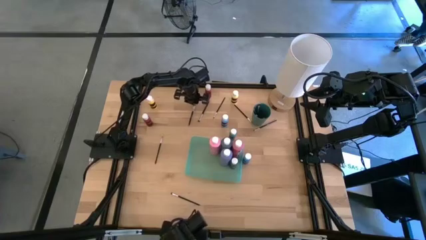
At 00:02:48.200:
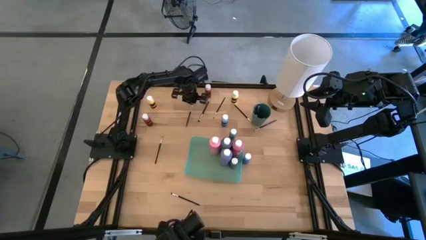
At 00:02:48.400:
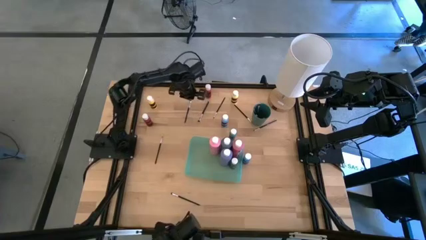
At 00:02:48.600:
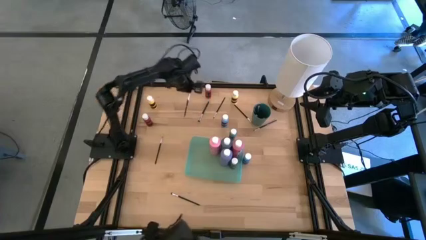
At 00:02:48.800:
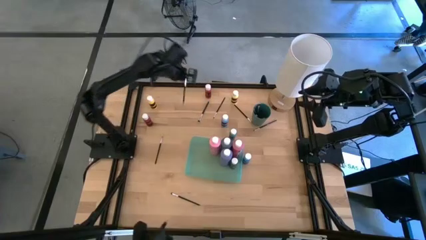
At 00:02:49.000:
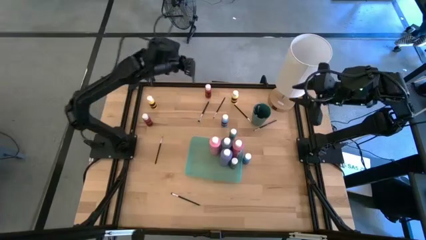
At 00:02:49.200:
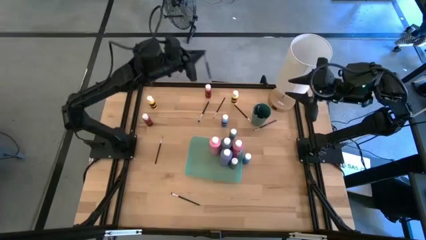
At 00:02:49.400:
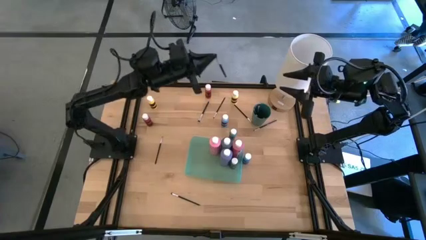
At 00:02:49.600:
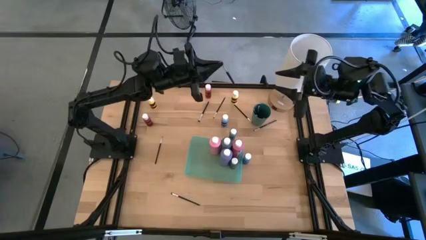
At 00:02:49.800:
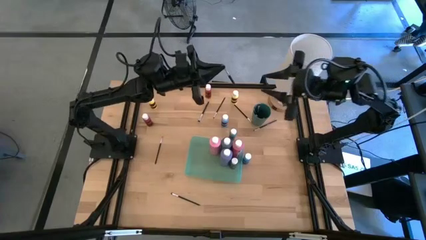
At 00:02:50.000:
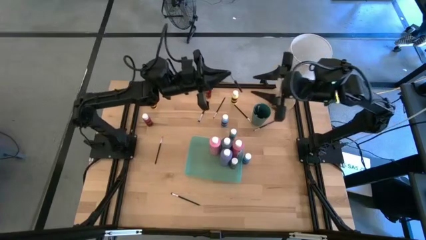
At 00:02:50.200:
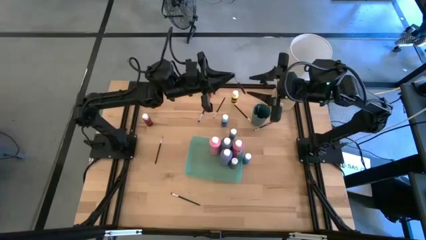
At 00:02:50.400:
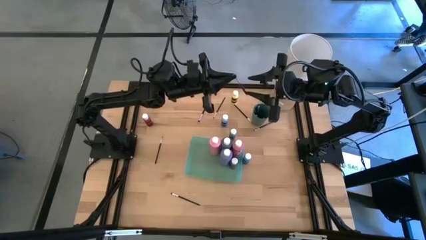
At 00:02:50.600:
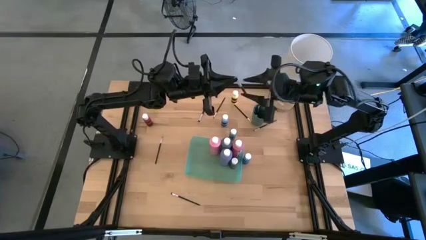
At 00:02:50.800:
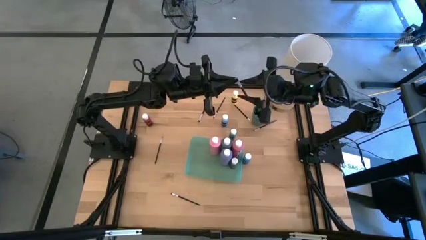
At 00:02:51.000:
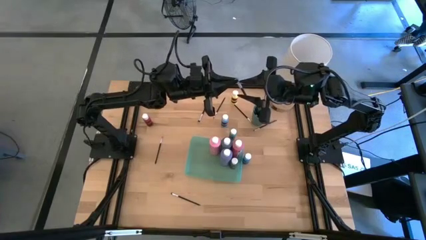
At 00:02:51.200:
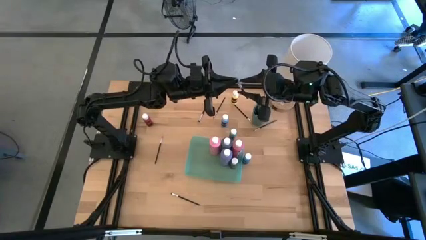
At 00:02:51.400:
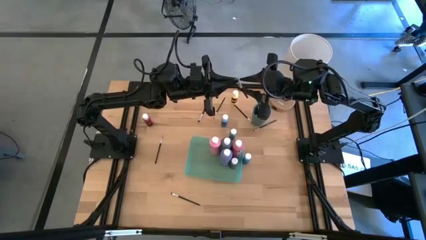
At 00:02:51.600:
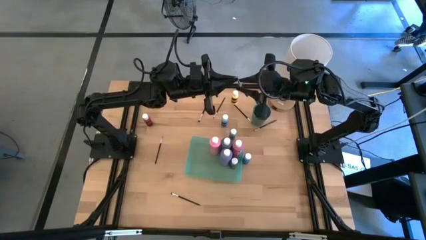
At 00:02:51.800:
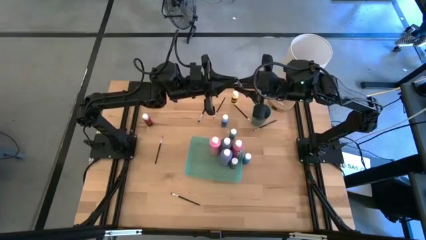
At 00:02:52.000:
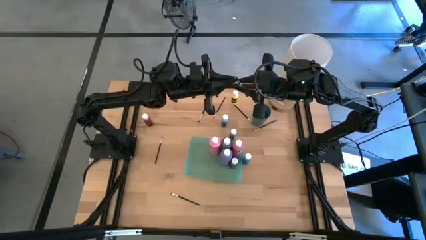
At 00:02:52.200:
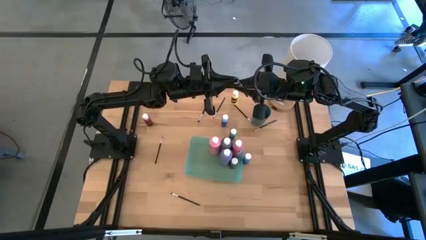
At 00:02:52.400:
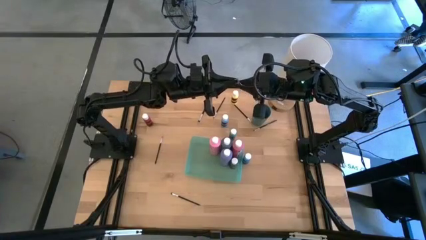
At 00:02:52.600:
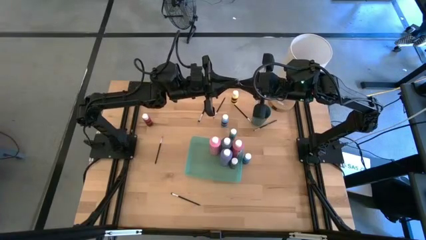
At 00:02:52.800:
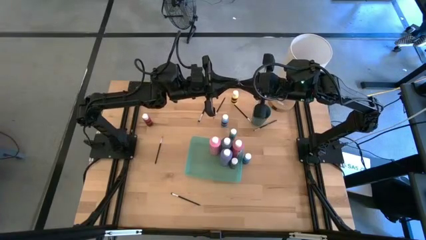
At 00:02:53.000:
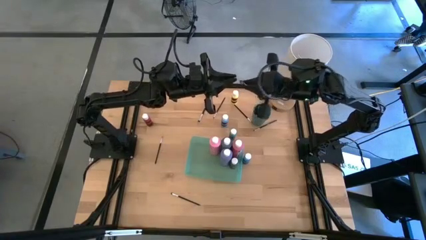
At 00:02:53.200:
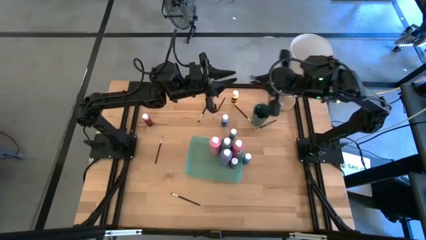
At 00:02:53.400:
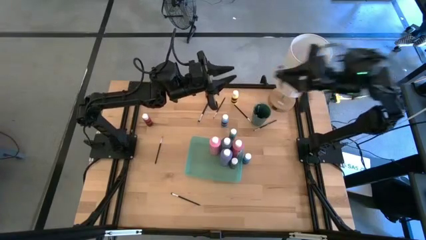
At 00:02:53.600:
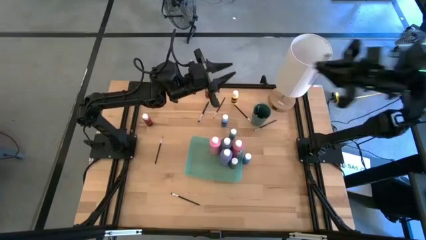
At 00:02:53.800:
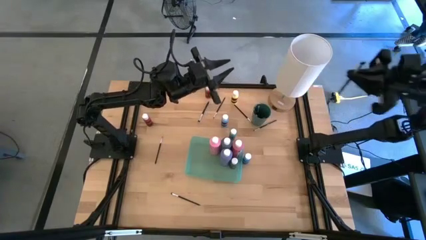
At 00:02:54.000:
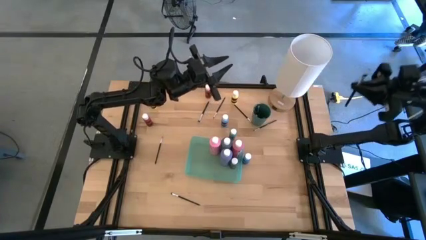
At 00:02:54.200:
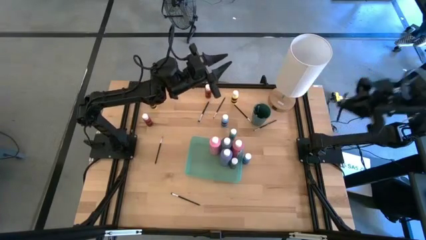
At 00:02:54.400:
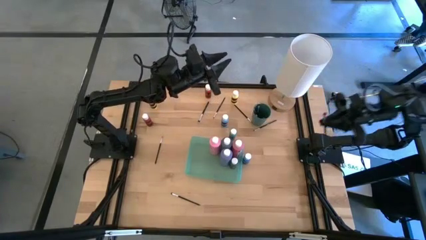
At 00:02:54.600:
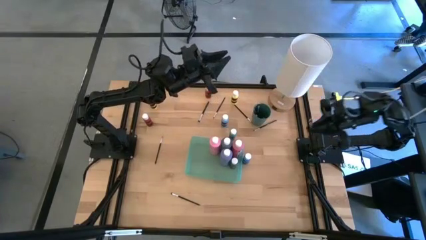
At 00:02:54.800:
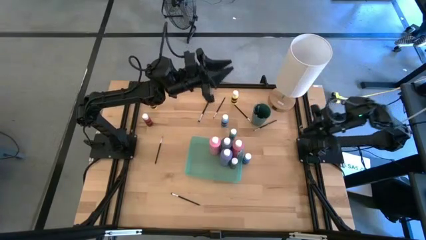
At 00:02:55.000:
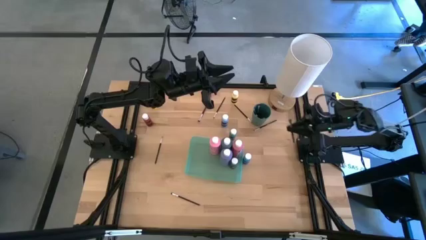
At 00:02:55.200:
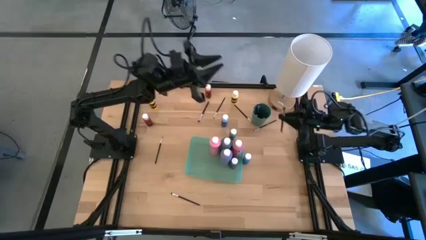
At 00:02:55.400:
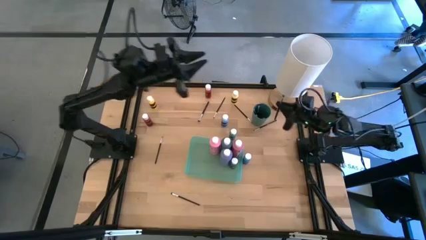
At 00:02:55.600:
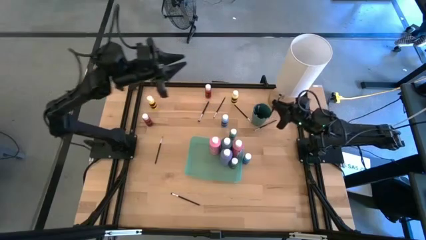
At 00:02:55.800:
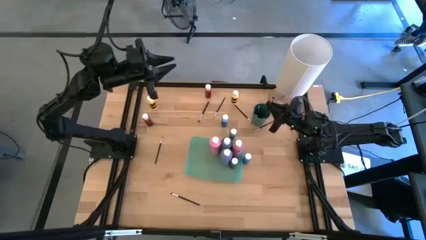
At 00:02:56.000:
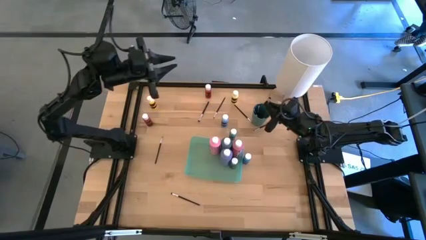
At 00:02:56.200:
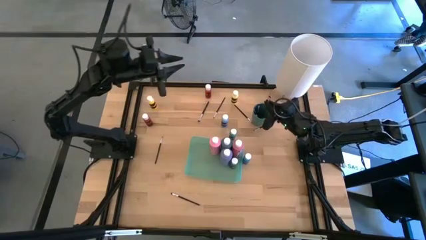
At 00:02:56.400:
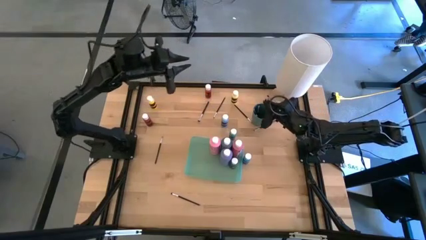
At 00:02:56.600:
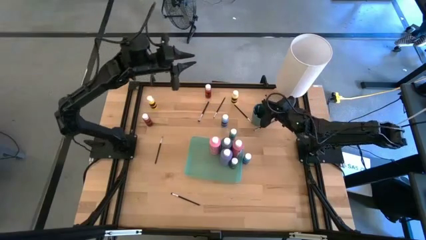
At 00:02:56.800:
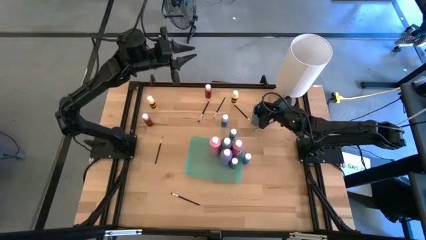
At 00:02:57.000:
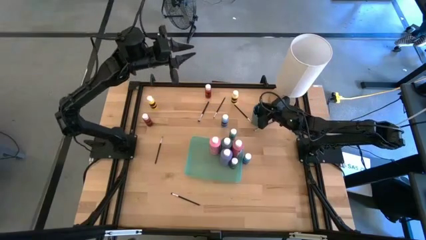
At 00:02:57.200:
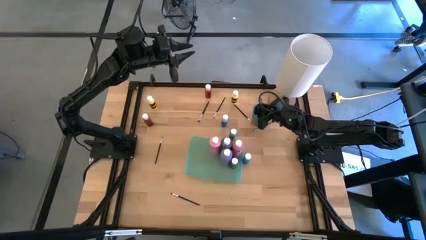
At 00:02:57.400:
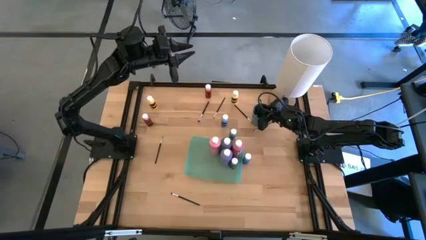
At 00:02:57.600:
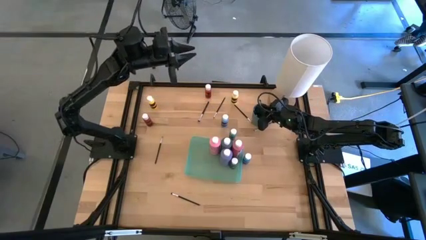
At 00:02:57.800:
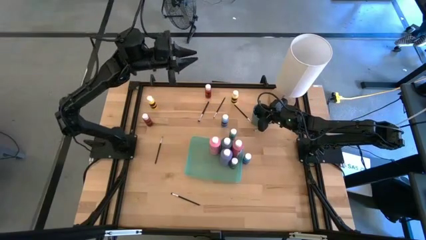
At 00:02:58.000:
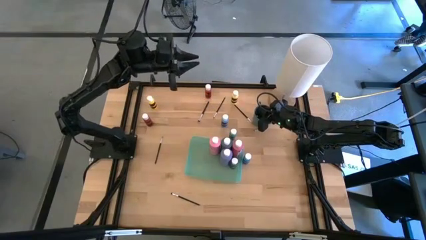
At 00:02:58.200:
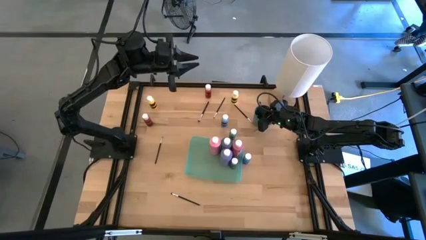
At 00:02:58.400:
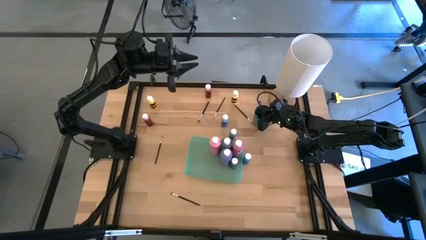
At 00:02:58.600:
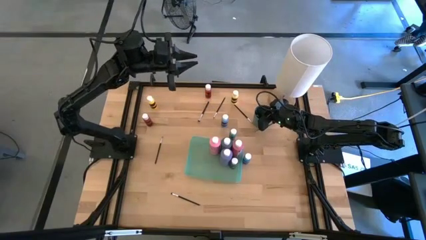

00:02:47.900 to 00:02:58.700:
Task: Pick & Place Paint Supplies
Put the black eyeshadow brush into the green cup
